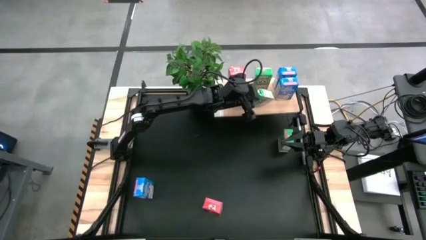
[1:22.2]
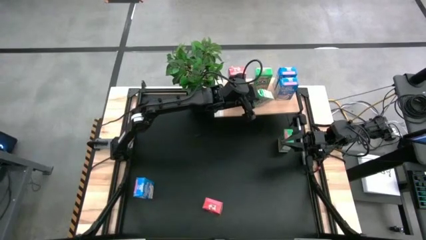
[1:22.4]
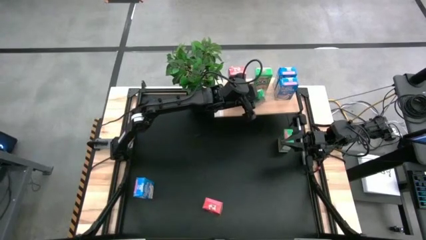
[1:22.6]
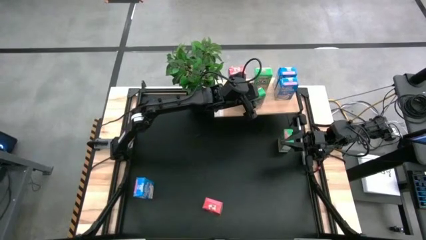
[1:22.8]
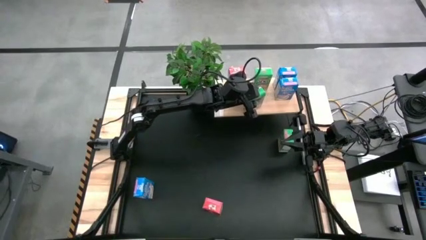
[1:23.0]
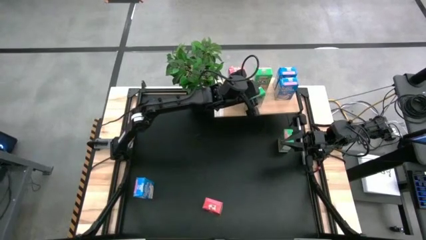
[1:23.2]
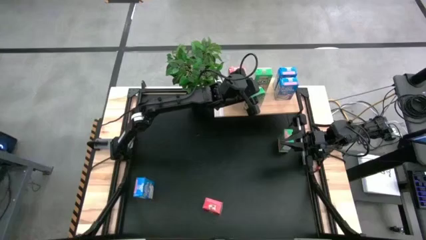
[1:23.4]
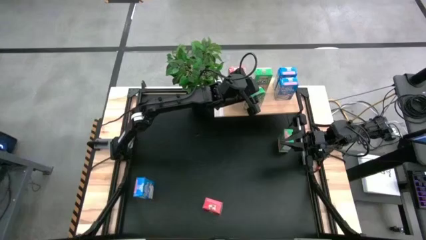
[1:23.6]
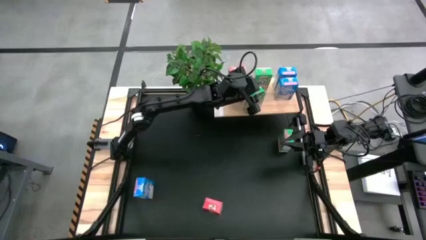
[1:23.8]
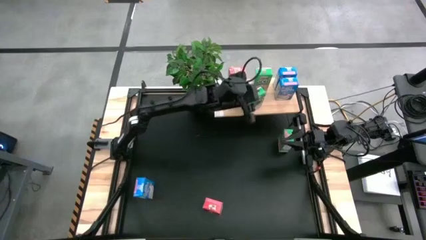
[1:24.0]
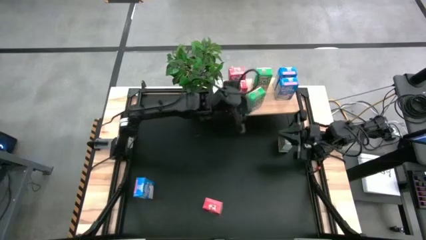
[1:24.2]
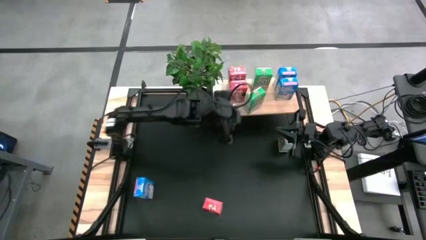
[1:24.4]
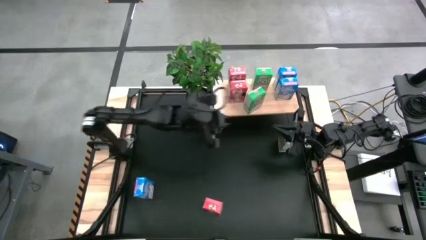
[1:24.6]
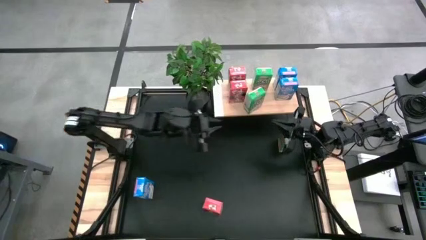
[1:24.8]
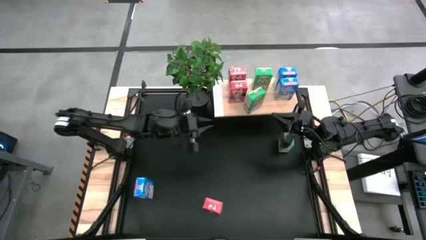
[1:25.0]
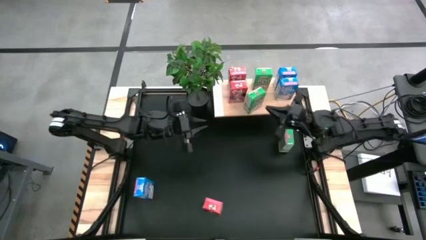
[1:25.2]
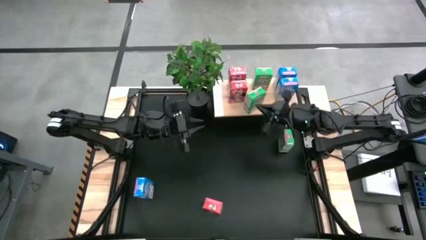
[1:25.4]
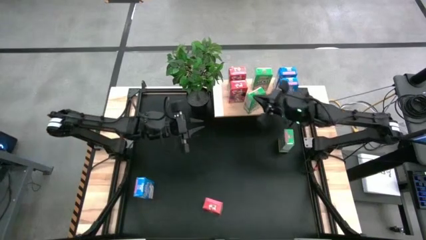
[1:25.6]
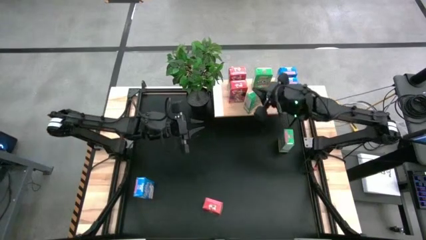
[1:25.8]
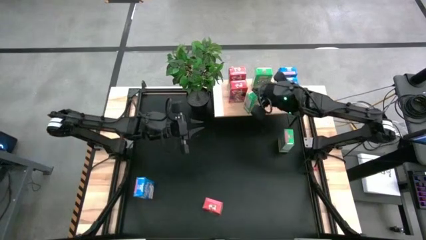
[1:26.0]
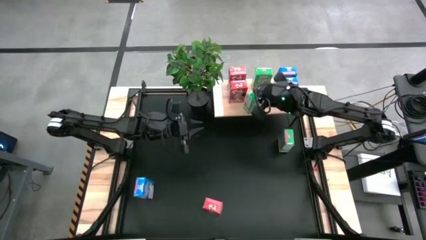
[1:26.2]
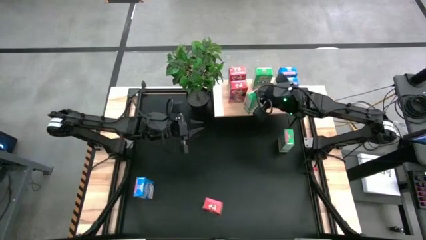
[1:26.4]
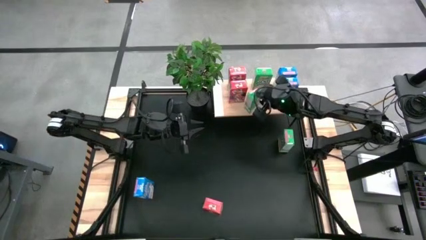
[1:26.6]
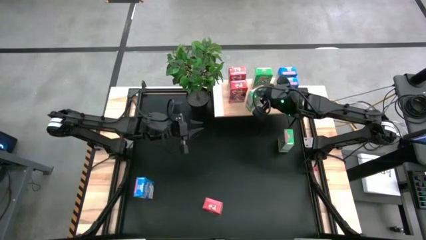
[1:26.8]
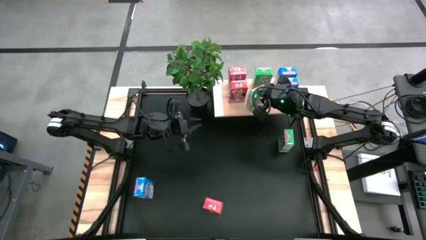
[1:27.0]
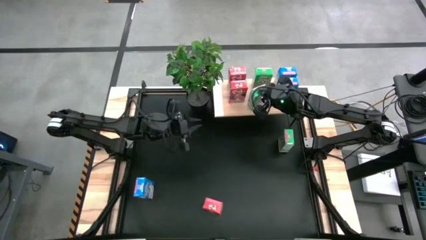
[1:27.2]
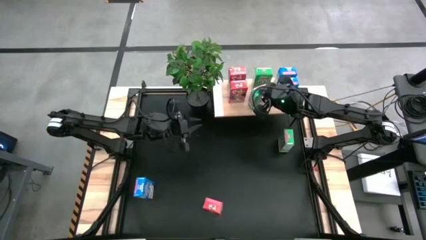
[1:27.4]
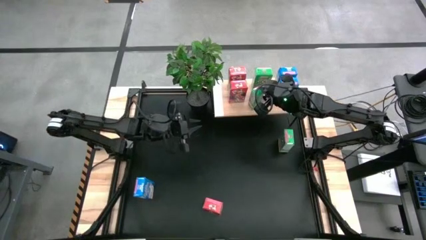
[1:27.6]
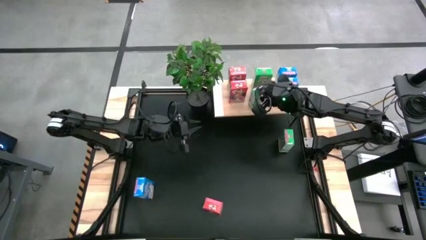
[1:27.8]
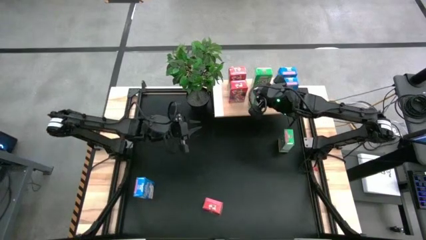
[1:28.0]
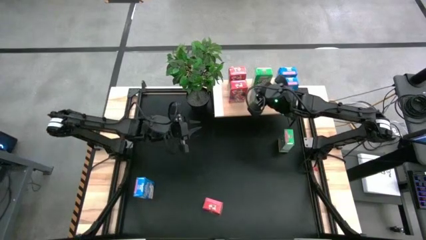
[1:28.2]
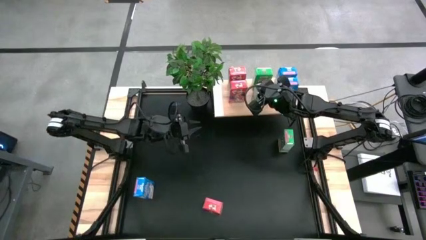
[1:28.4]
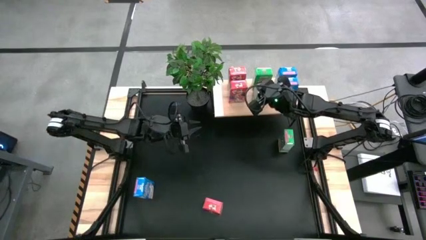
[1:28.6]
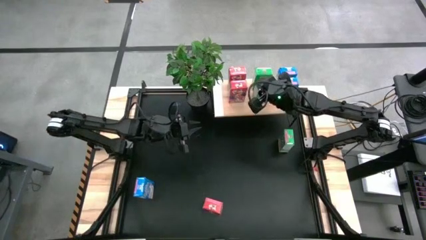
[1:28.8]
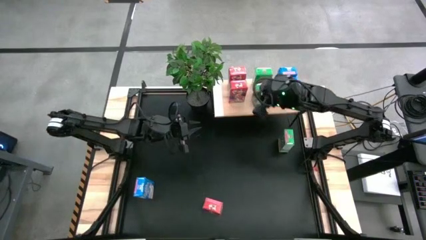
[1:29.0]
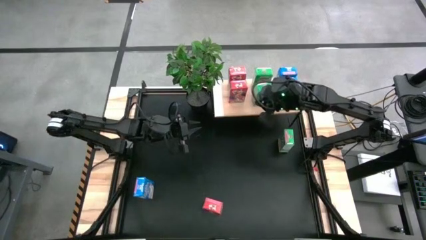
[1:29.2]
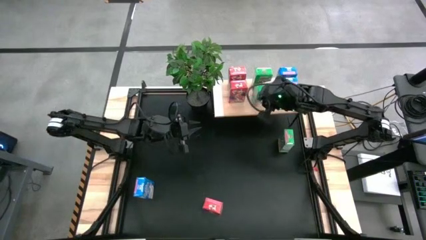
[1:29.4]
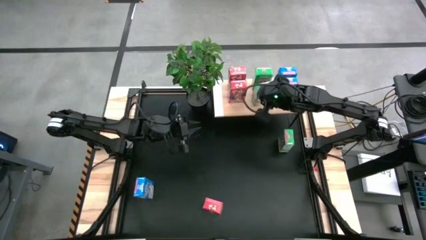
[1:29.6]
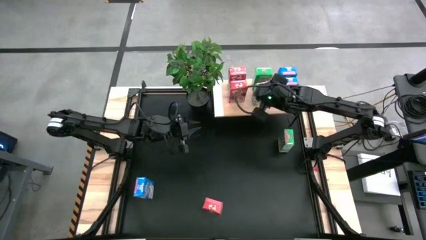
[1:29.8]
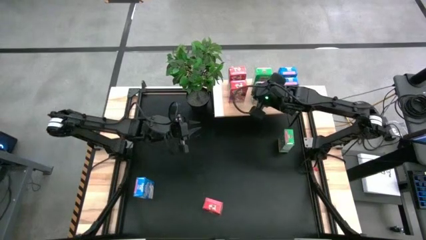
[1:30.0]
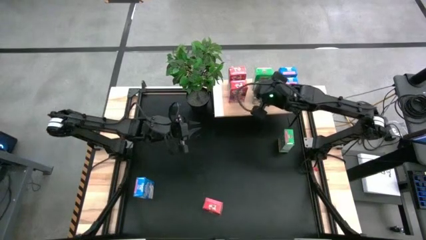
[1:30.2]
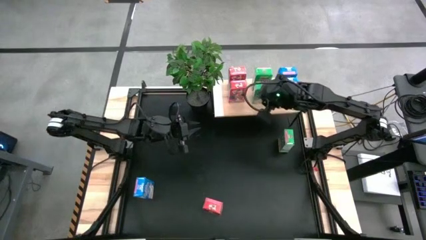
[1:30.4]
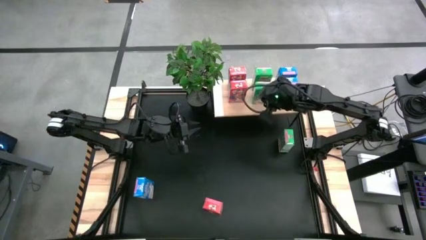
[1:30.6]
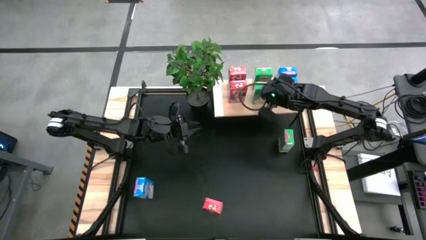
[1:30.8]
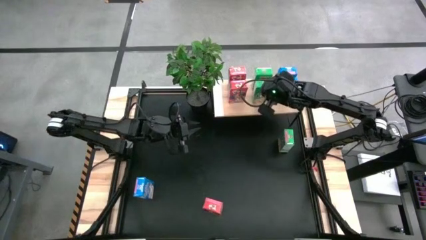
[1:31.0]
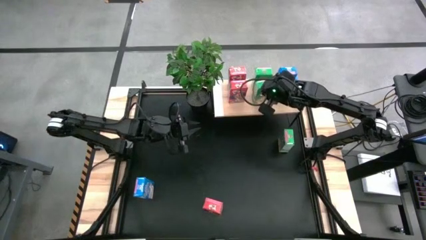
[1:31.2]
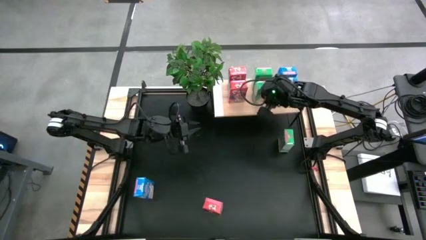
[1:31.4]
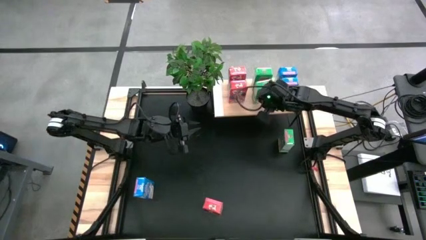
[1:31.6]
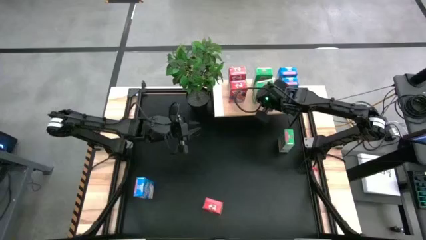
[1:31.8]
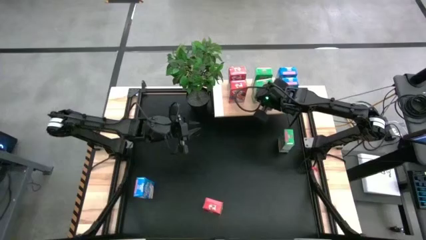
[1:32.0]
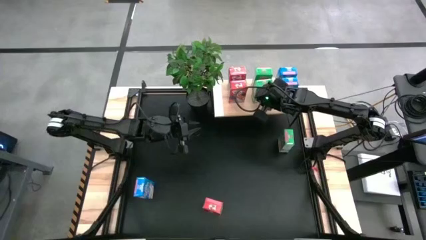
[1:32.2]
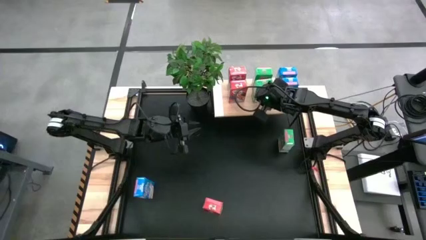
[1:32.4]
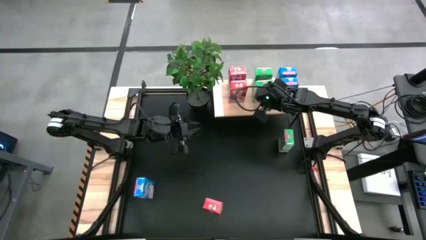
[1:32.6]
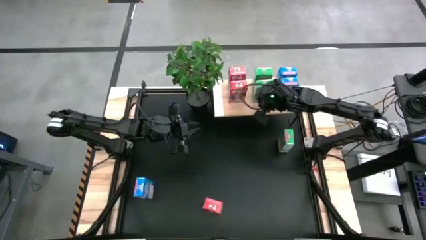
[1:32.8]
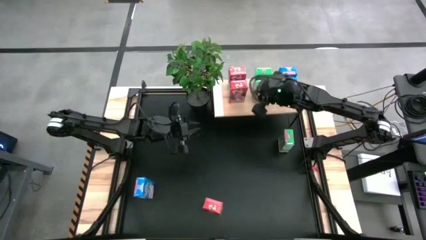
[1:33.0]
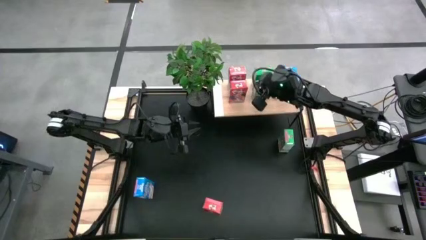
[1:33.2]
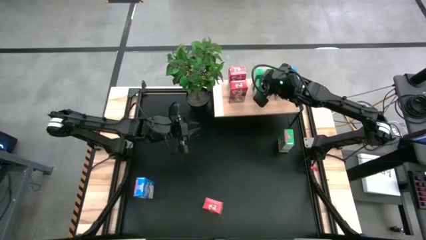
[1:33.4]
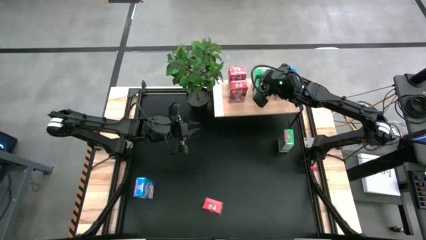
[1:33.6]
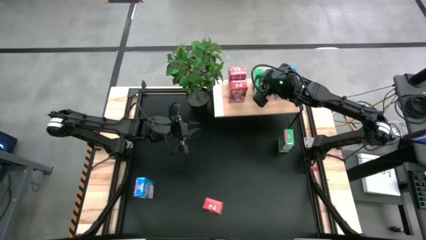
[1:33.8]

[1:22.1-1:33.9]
Task: Stack cereal on shelf
Put the left green cereal box on the shelf
